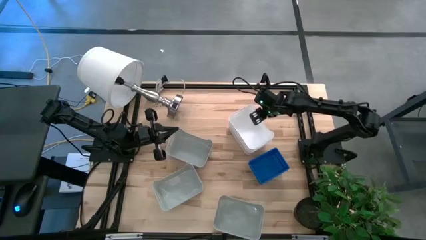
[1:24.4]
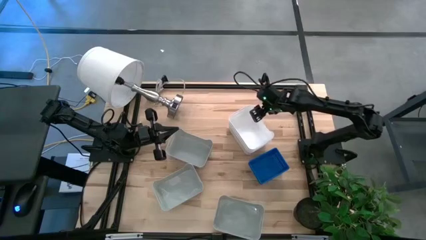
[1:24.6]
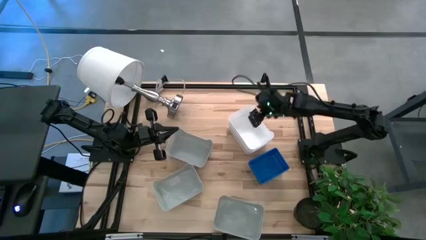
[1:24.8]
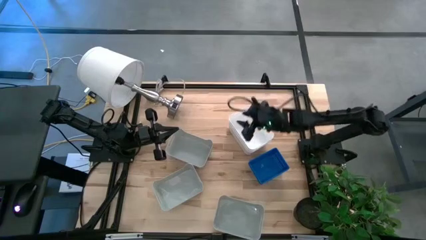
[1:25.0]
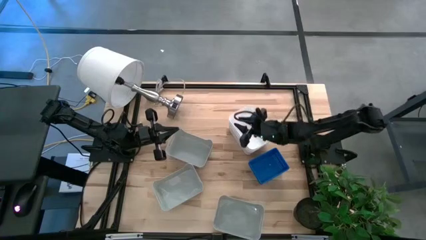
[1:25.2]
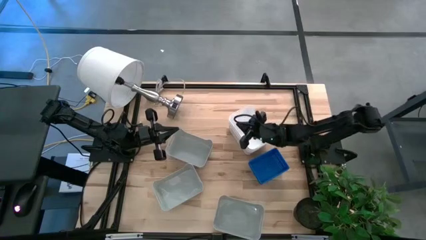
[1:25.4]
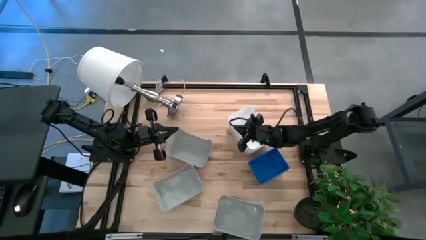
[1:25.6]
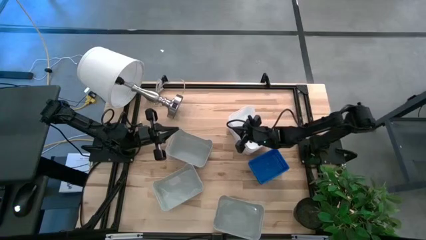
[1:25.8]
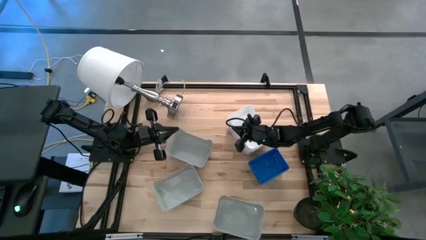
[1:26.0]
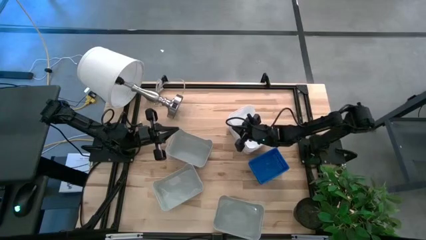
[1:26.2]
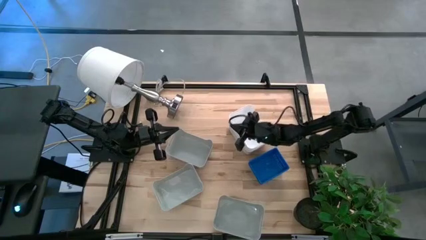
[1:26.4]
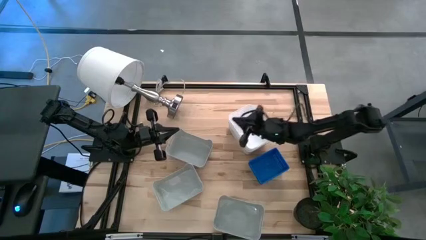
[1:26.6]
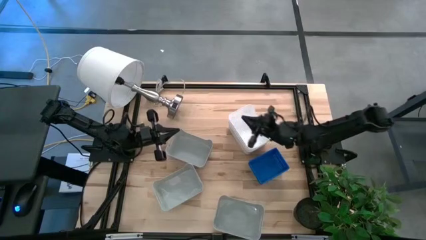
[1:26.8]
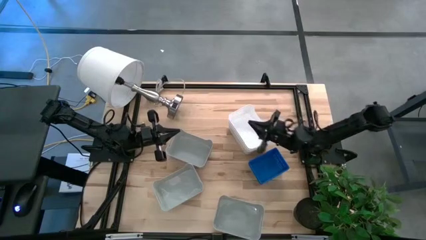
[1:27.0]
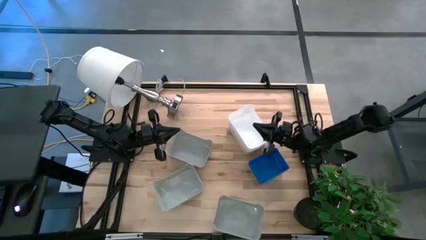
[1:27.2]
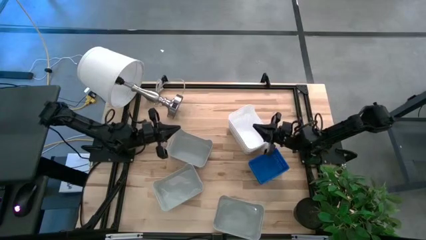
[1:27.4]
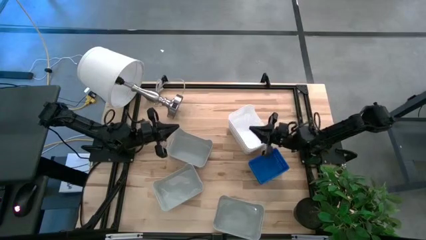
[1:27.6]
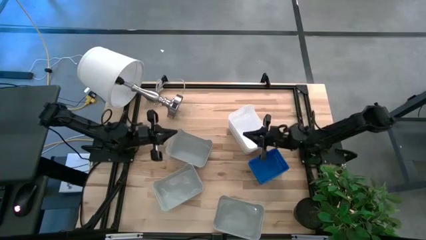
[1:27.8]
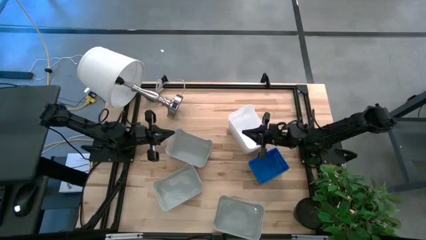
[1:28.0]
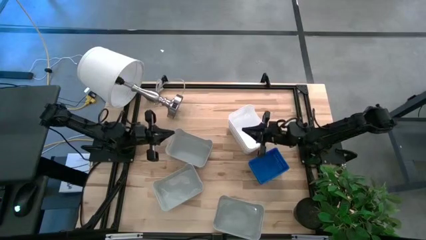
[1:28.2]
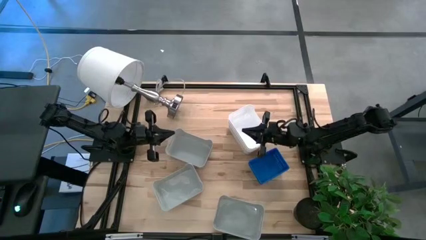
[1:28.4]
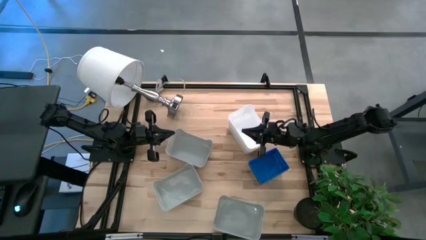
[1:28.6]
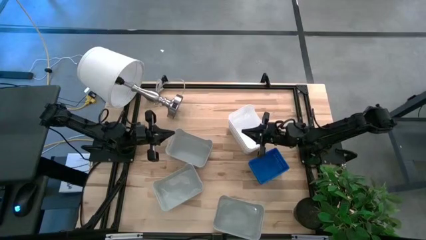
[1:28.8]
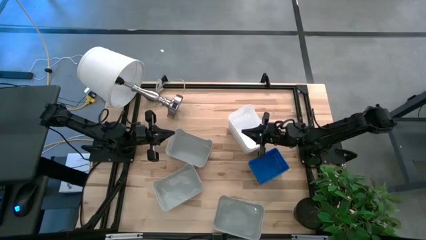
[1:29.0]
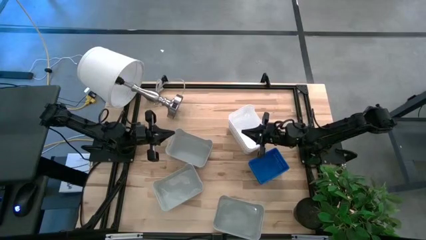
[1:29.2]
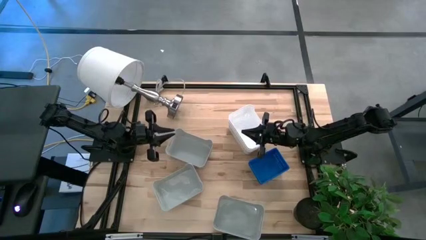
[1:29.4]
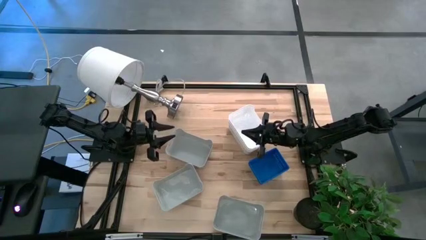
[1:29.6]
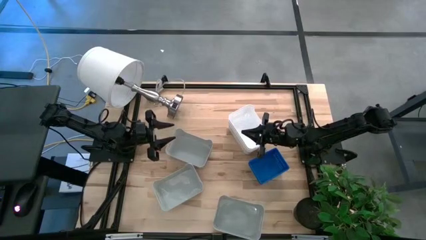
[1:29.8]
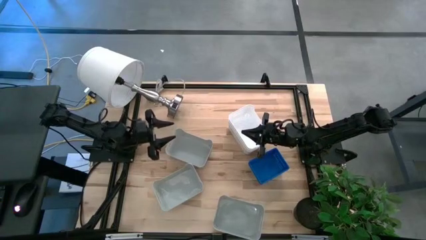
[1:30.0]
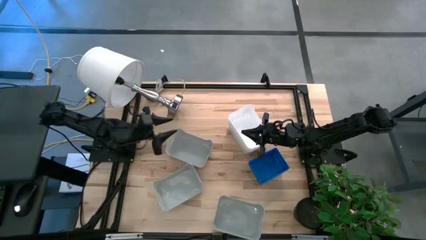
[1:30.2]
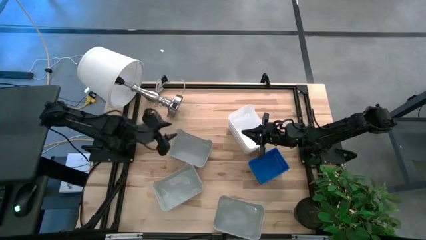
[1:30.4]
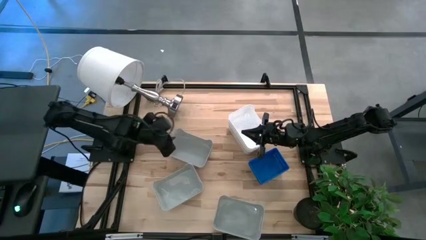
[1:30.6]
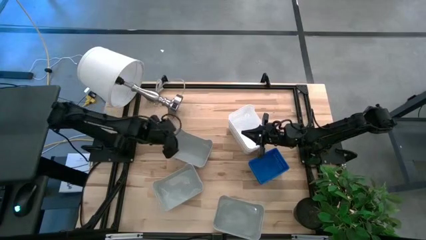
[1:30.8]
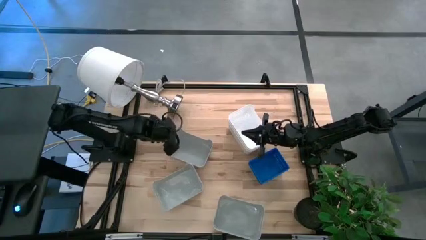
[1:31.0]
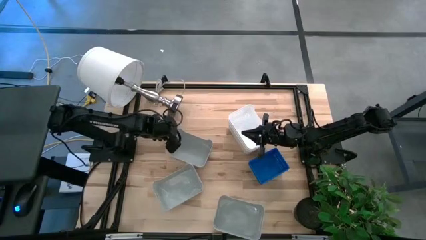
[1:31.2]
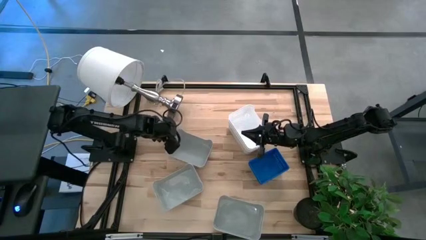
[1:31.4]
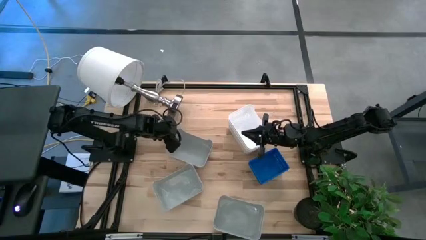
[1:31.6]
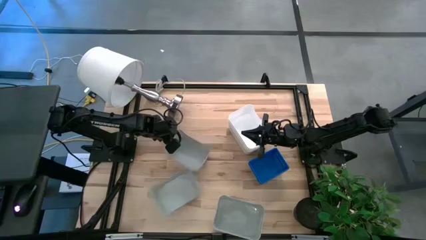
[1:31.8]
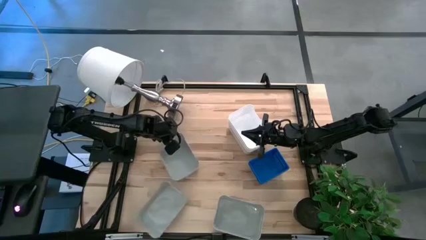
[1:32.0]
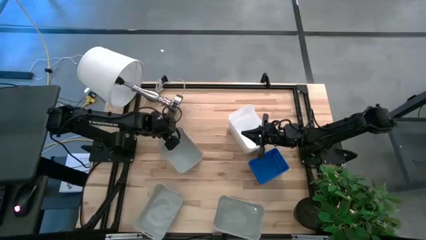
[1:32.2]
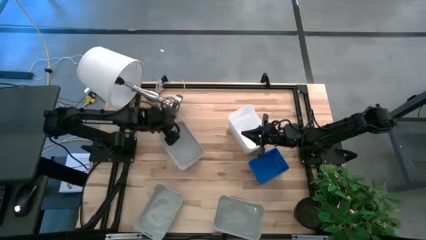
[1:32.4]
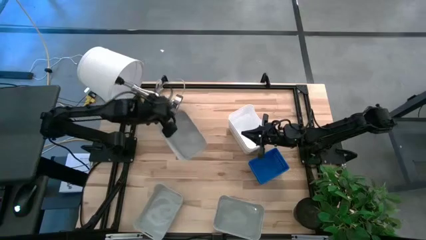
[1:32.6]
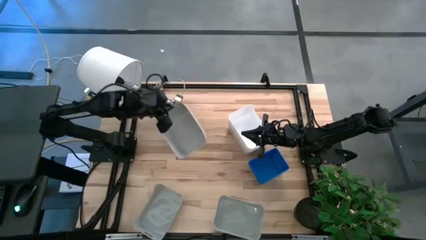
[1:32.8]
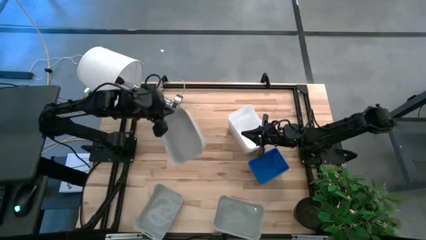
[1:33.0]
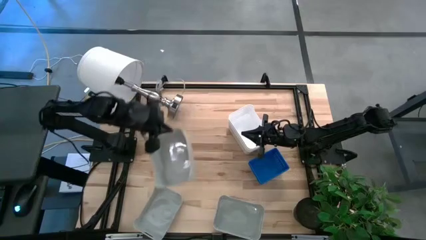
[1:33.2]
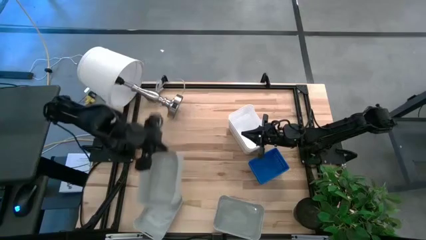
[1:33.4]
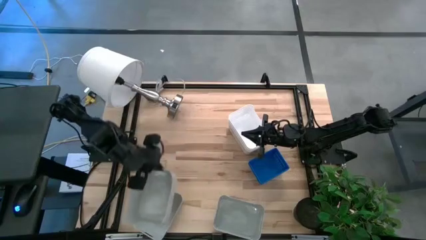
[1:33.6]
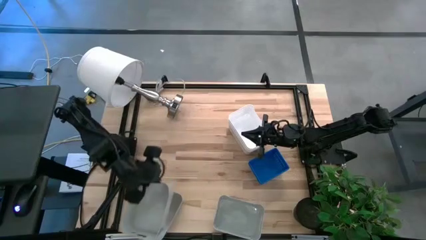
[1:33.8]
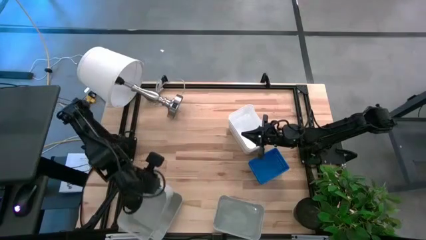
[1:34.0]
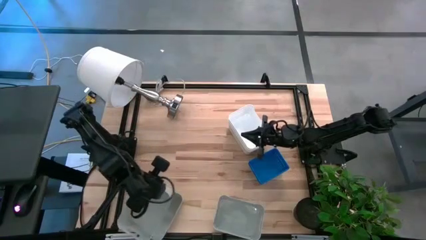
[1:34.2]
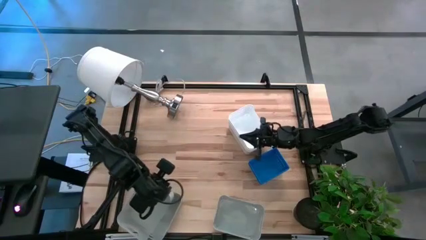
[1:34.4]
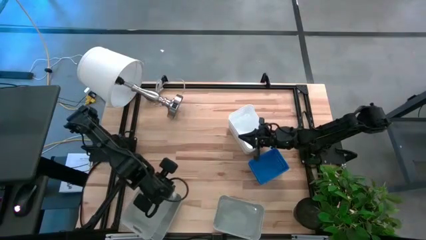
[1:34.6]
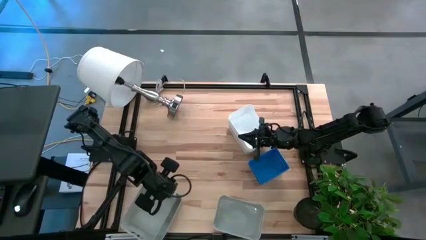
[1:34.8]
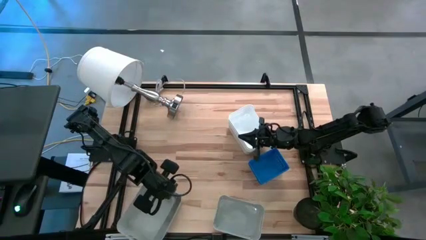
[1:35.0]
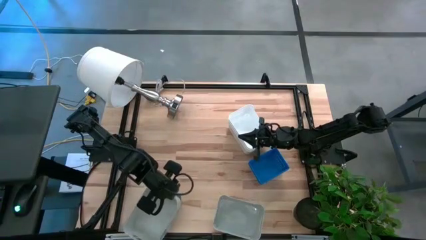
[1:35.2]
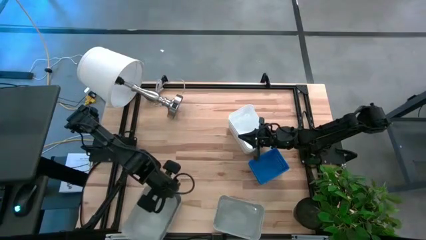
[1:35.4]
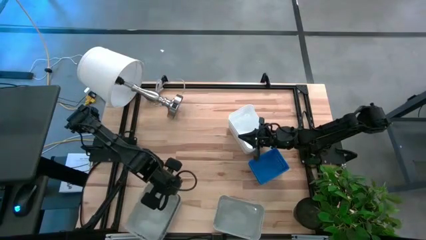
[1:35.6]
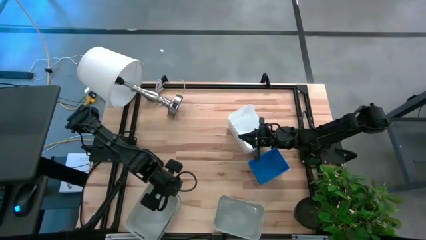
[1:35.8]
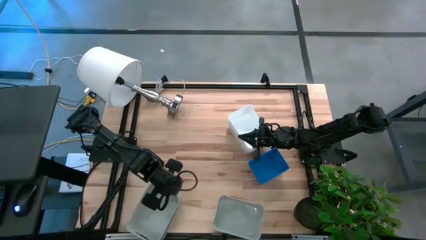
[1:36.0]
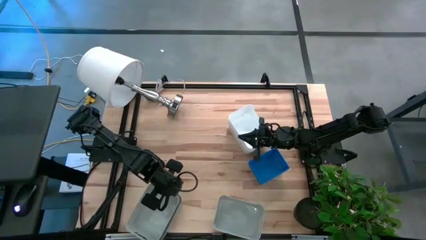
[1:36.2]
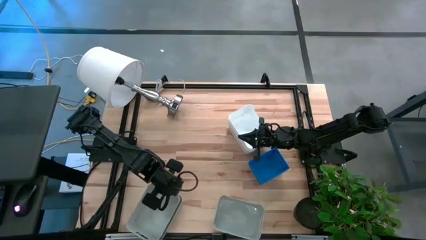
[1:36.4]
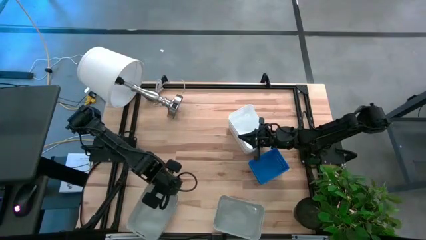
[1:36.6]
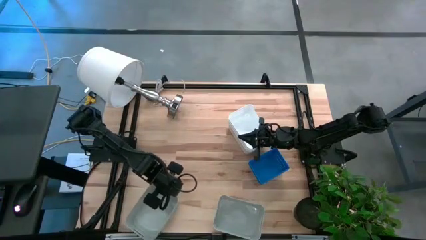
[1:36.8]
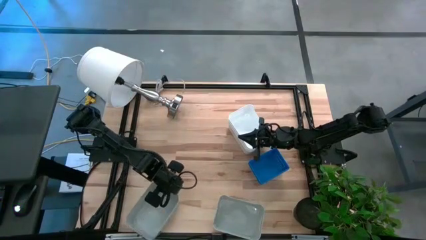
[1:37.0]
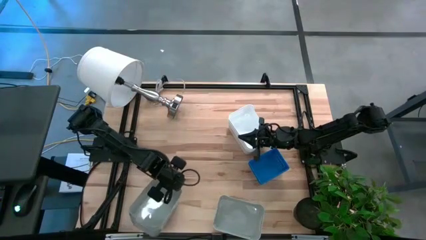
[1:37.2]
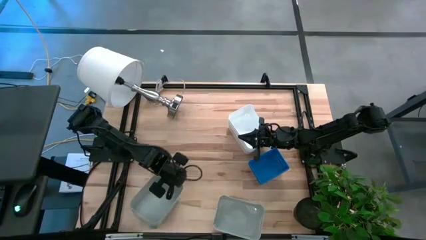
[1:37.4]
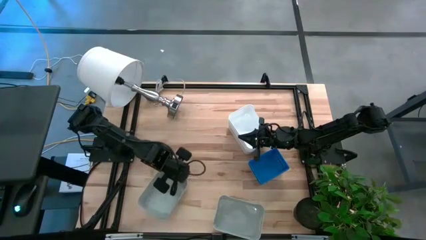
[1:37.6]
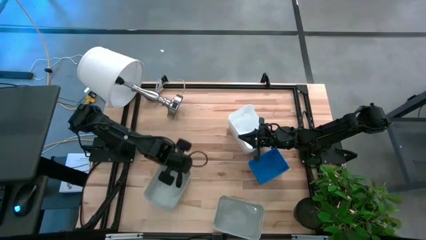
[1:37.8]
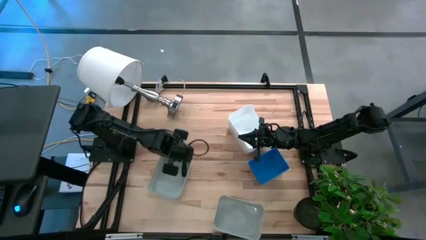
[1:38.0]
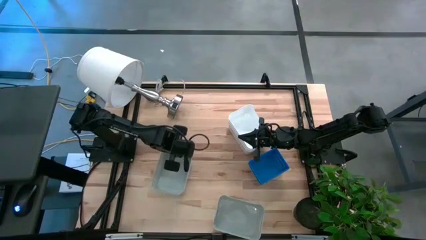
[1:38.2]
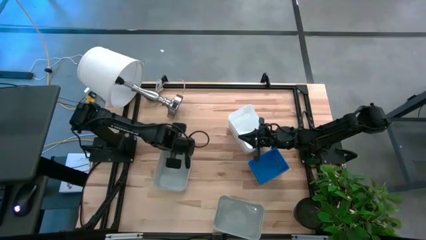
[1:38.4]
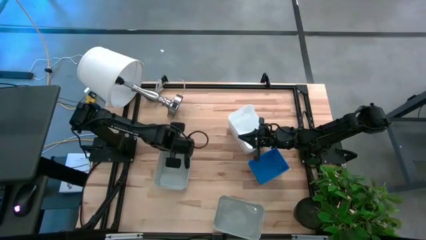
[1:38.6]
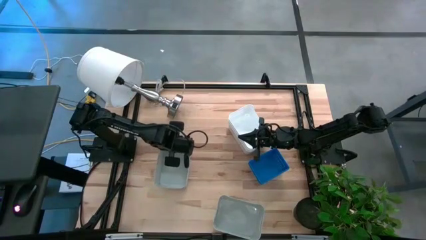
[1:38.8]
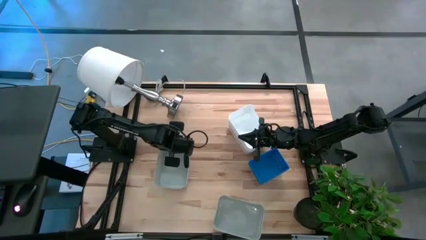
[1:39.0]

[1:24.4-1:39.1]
Stack the top gray bin on top of the left gray bin
